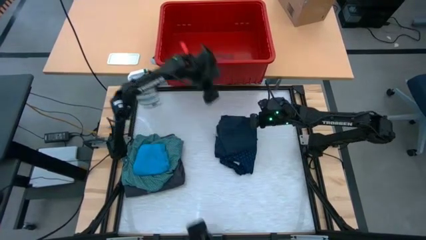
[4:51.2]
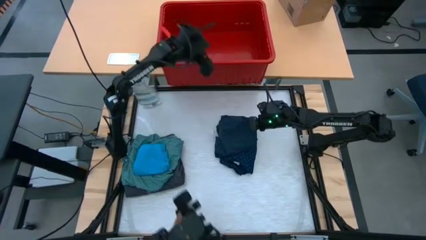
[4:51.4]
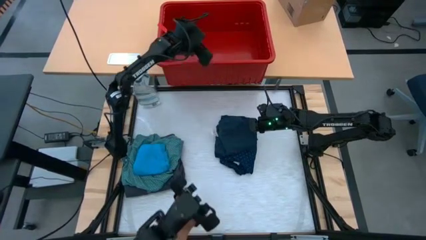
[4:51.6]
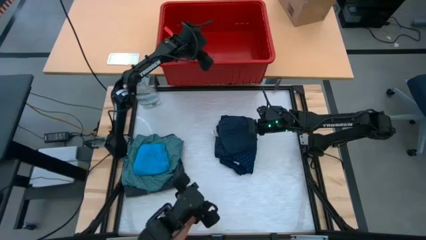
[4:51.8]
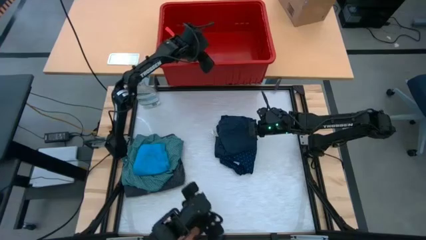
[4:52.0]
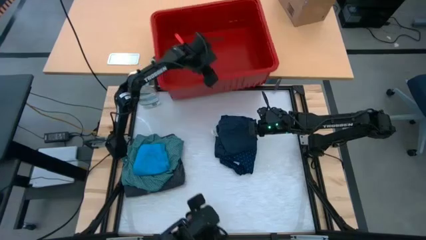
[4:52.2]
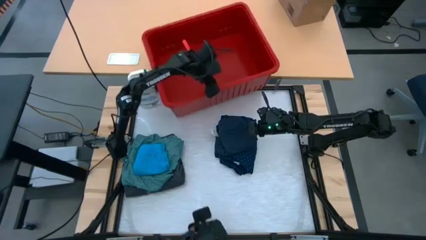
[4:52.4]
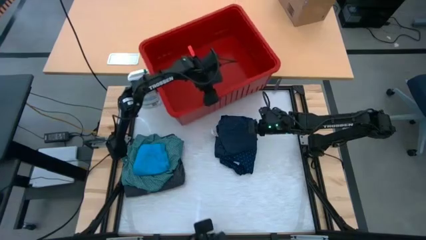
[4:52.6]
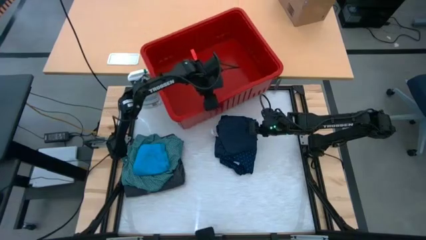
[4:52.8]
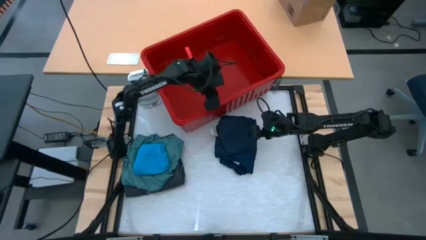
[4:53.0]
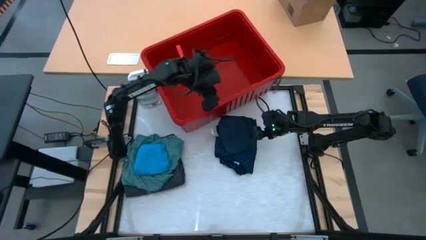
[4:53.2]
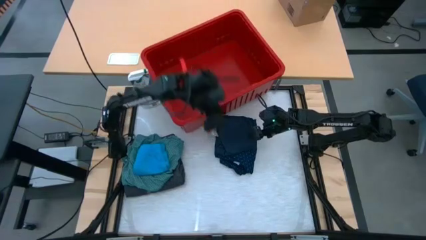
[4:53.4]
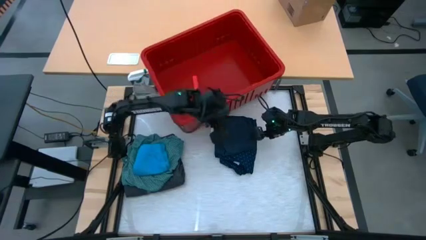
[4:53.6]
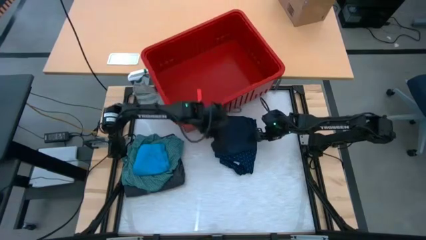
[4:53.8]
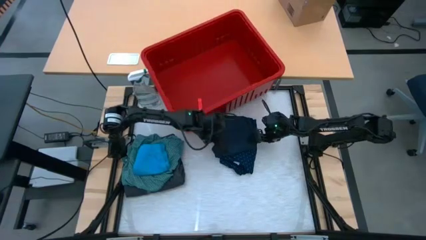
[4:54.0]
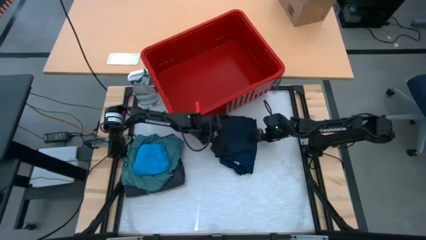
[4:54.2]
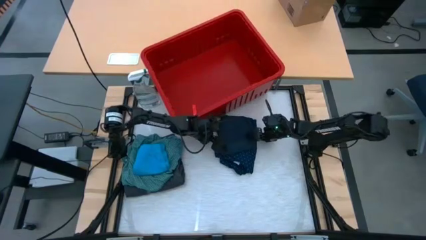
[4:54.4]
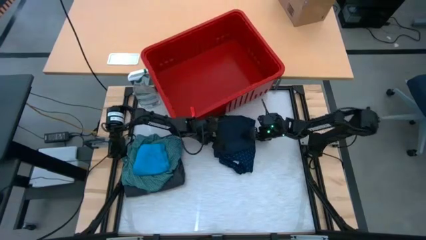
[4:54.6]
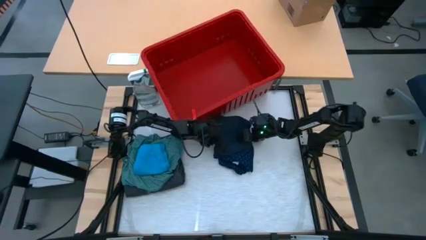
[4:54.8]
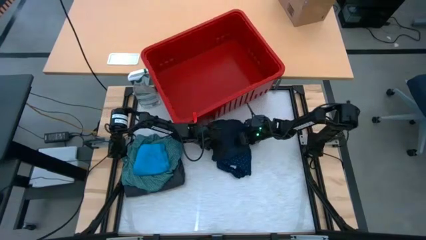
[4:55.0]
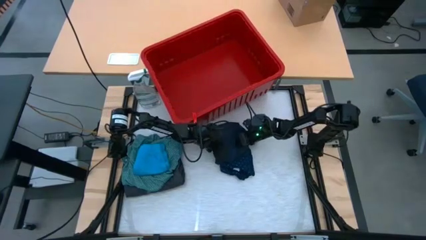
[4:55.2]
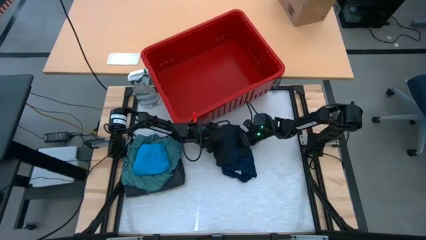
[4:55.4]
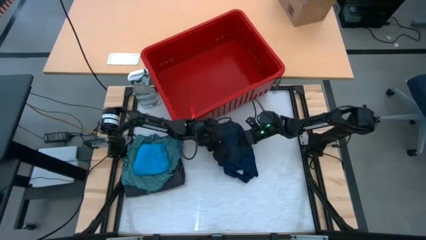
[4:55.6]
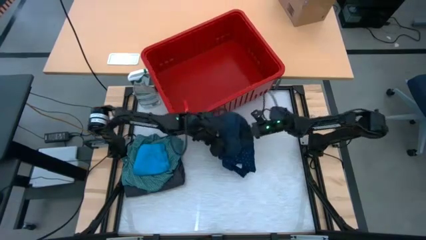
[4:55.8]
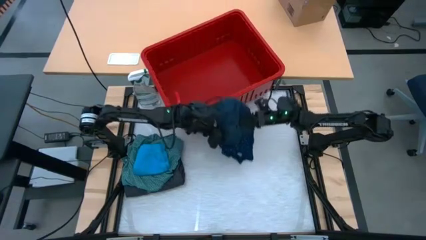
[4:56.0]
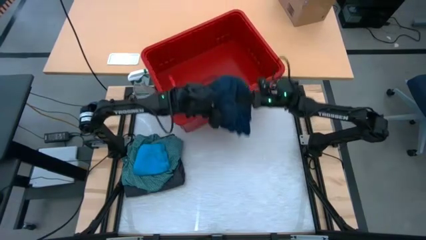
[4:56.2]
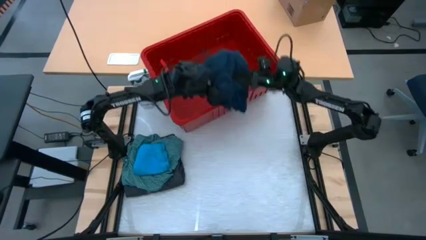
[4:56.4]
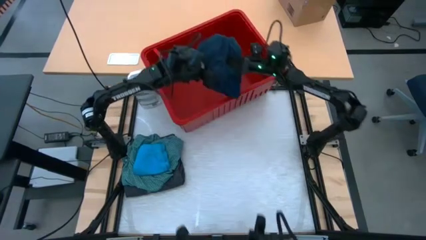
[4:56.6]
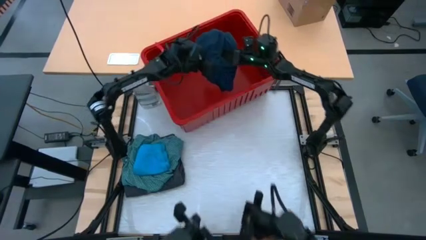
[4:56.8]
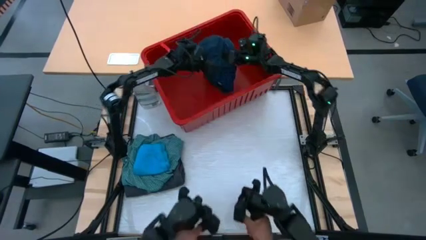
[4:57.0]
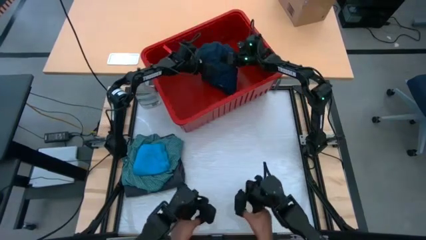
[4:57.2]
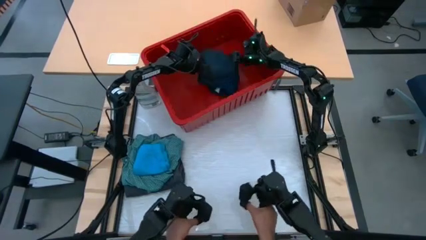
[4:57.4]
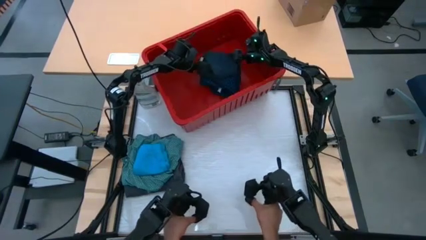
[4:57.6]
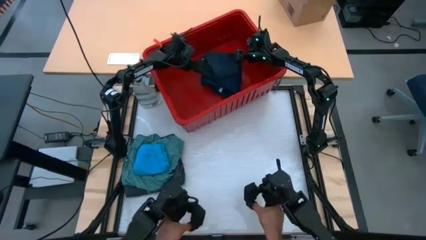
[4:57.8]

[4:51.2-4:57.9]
Task: Fold laundry
Put the right stack of clothes into the red bin

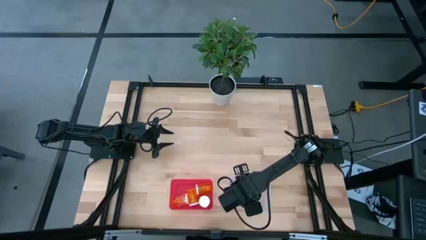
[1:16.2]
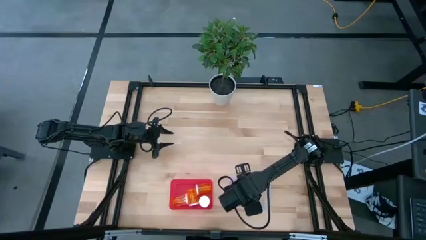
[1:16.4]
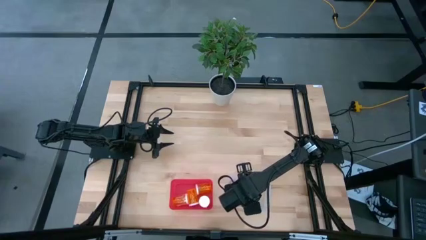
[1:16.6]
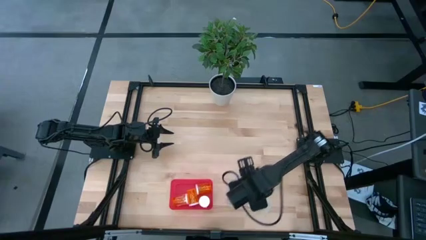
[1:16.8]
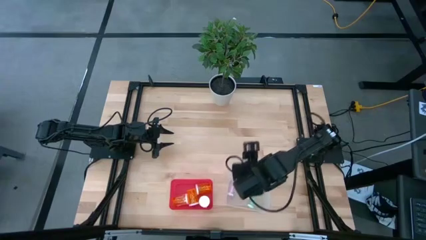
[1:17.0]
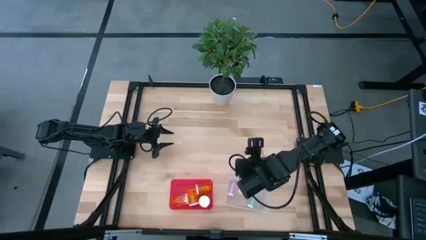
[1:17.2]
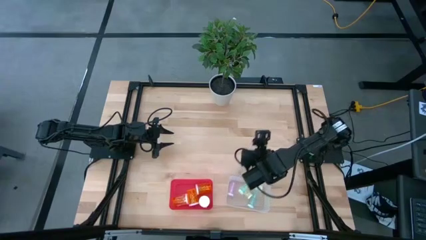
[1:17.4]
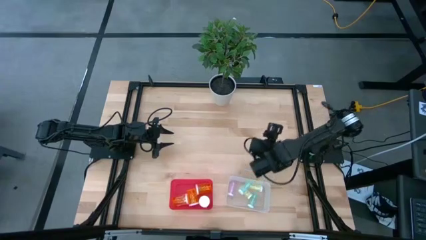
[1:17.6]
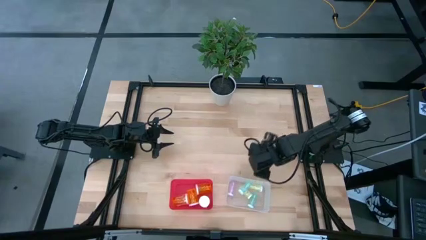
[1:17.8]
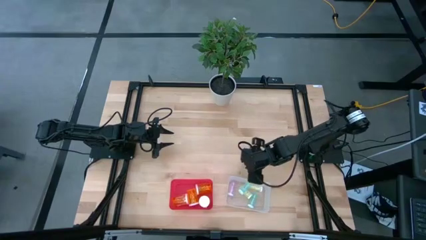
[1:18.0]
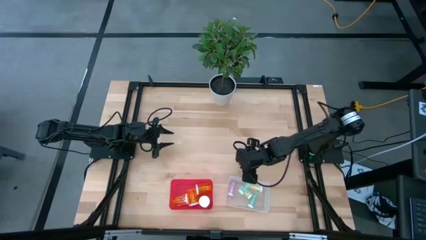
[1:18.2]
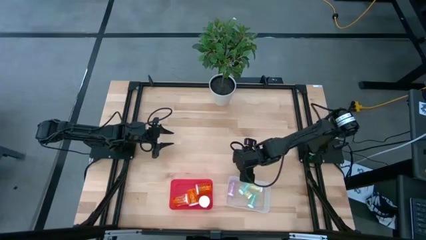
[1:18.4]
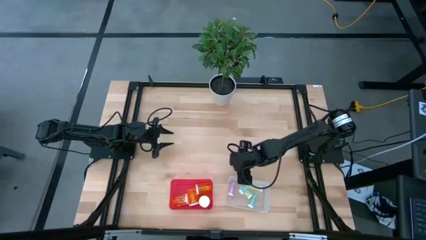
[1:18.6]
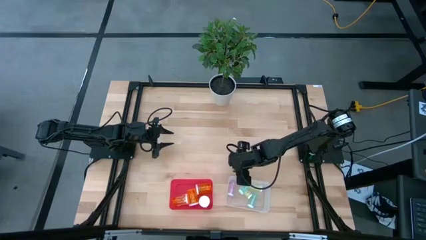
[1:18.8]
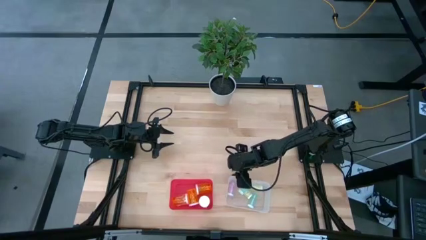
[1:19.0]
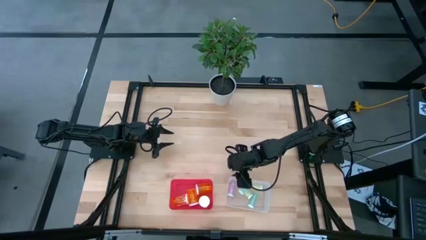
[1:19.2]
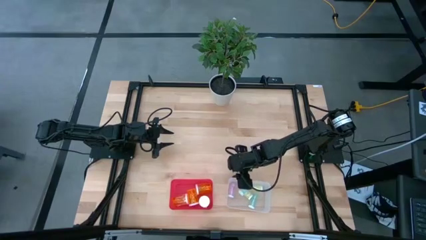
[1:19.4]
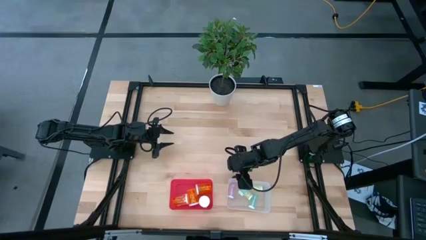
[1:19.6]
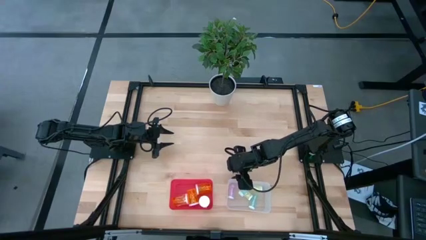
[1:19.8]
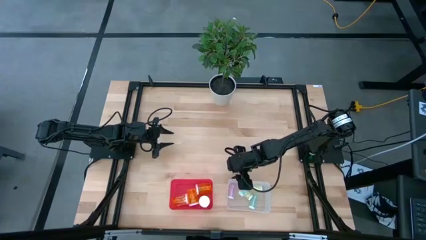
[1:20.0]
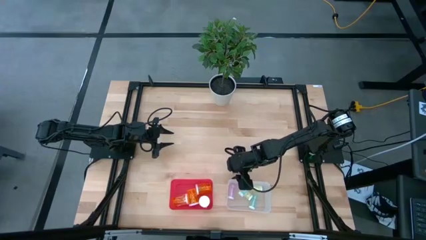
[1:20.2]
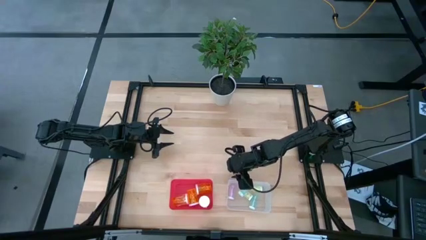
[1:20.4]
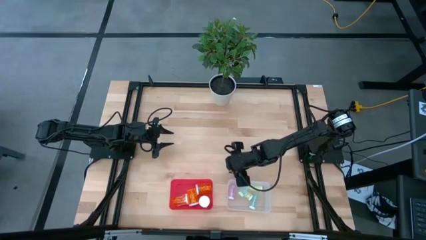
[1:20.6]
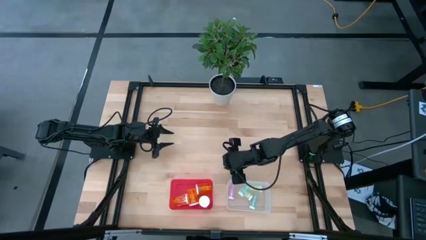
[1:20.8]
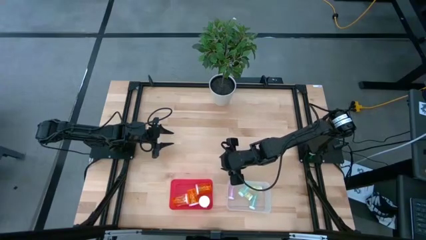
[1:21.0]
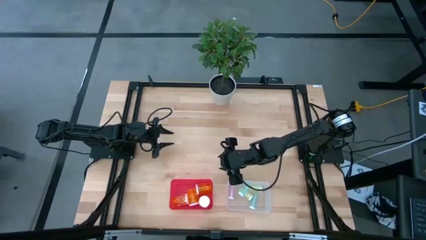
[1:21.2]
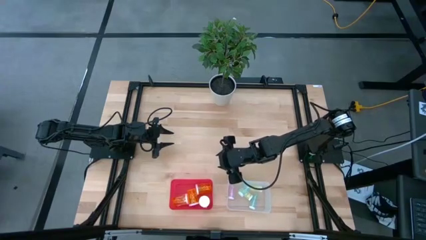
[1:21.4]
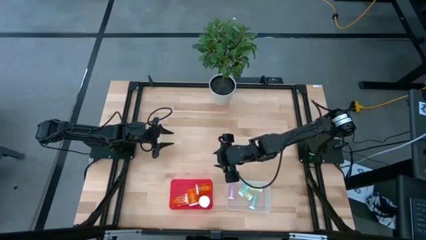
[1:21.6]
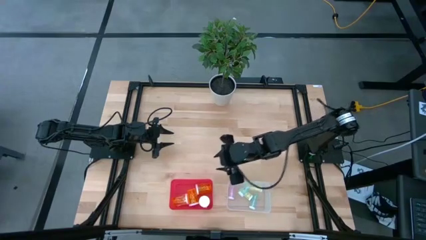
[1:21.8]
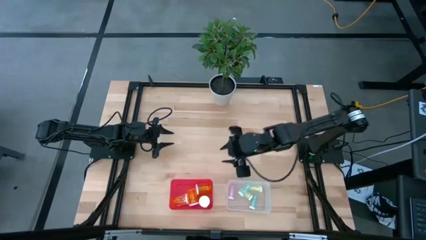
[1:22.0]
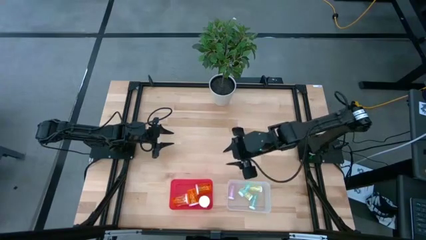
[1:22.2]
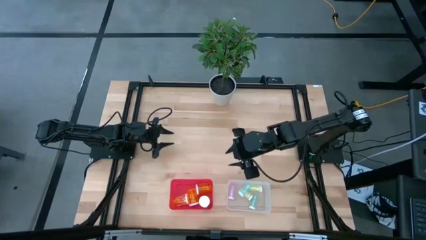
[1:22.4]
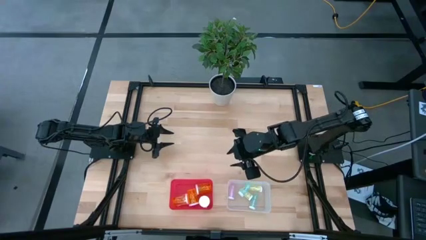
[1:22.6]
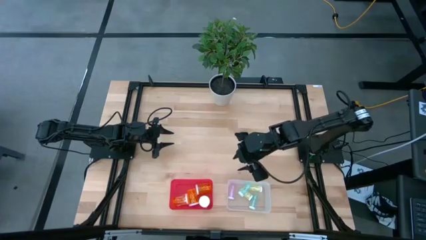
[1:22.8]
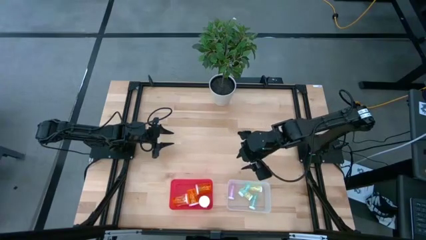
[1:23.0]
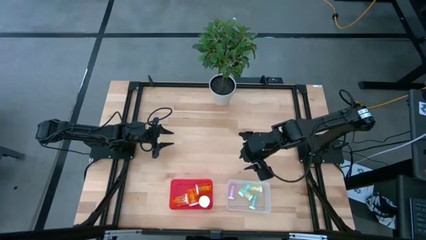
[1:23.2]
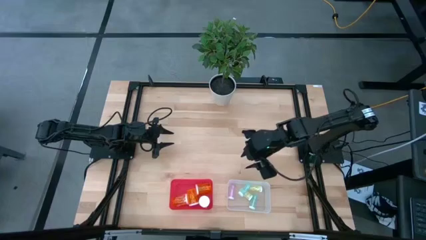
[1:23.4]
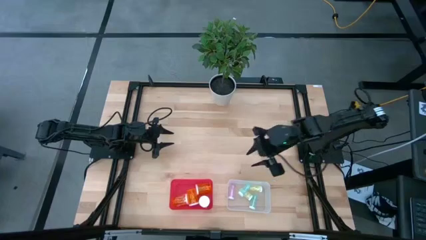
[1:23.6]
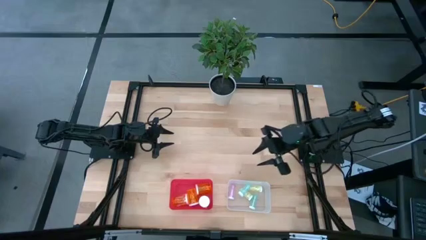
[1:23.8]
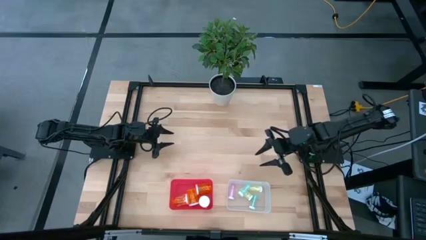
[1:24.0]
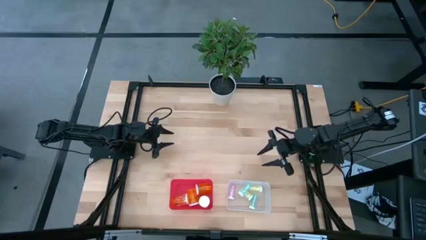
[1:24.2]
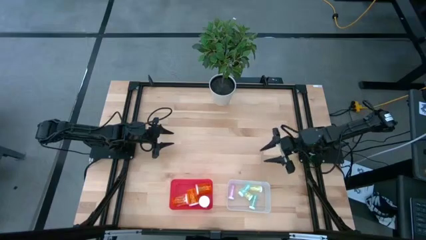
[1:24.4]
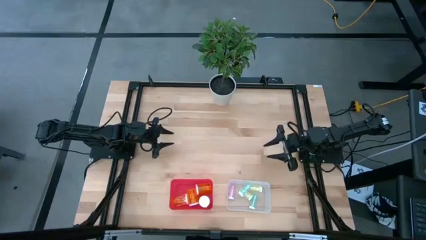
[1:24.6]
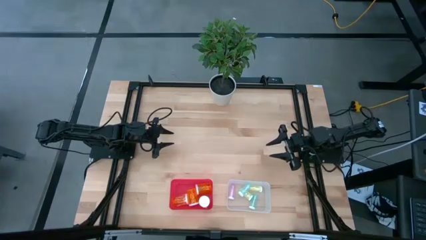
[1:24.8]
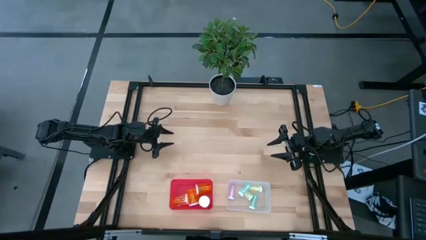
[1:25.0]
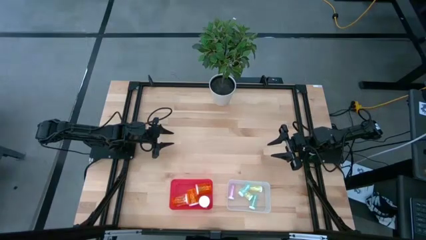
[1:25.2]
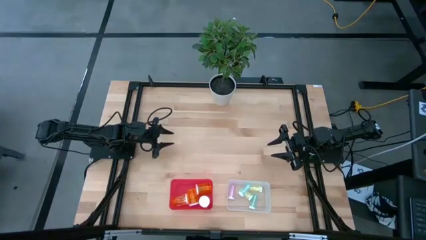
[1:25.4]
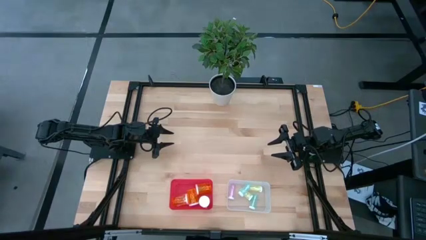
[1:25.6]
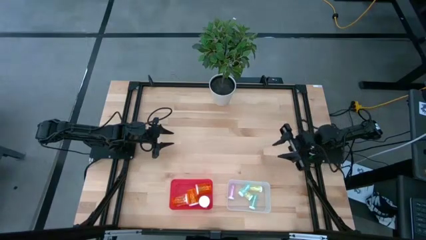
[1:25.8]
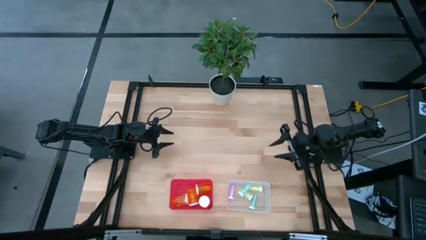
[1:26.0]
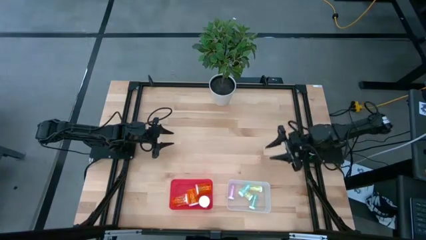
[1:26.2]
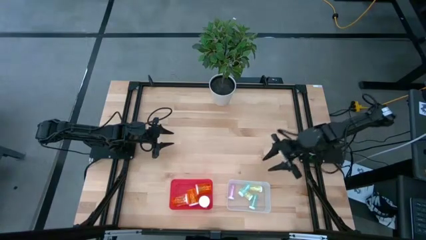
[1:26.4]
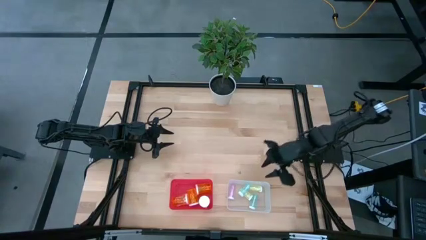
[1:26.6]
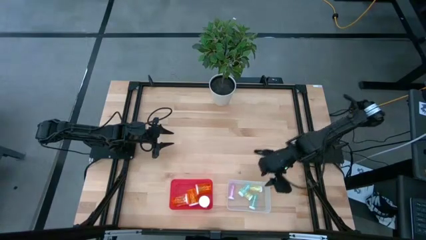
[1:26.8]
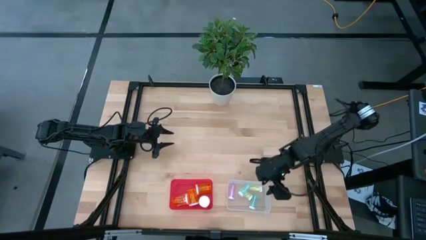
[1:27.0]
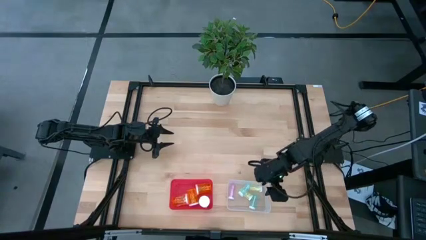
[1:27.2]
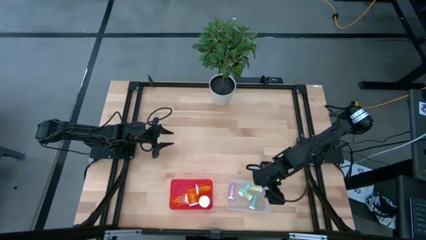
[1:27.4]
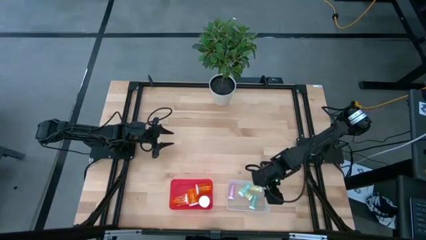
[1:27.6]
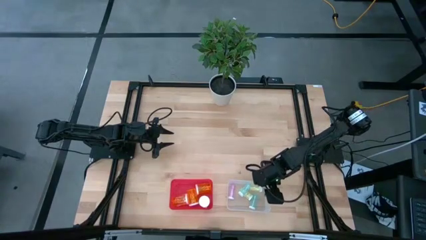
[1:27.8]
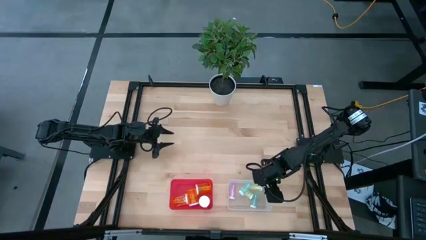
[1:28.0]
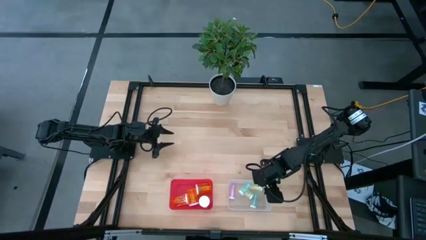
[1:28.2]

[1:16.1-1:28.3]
Task: Pick and place medicine bottles into bin by pill shape (circle, oval)
Adjust the transparent bin
